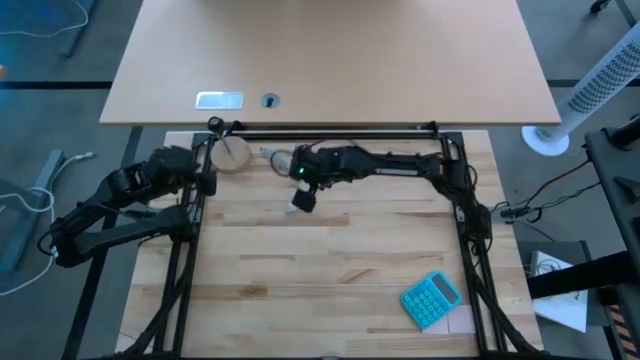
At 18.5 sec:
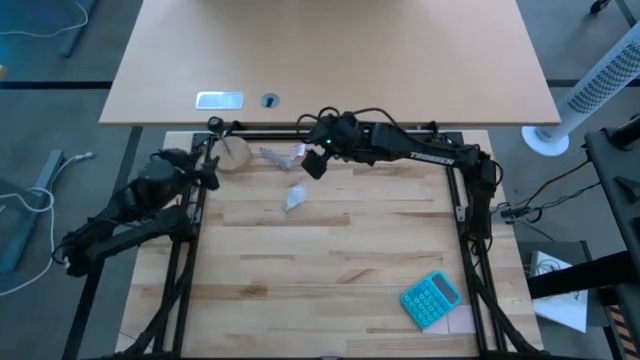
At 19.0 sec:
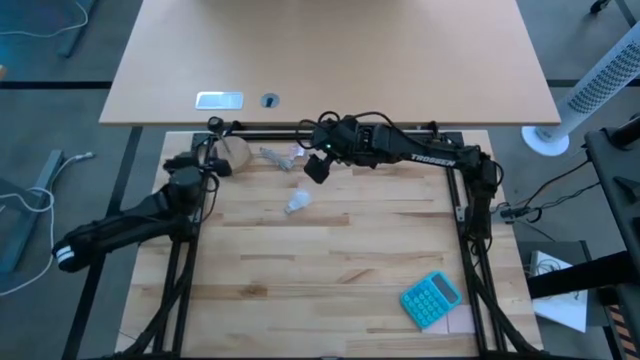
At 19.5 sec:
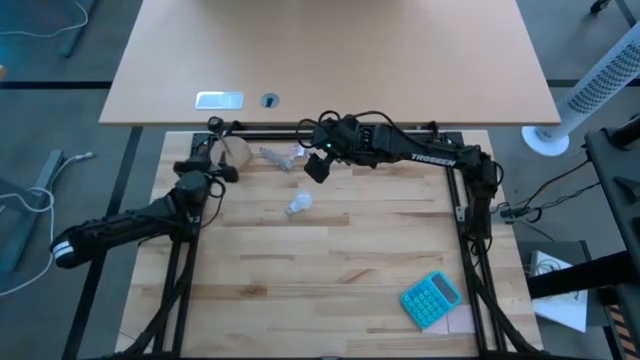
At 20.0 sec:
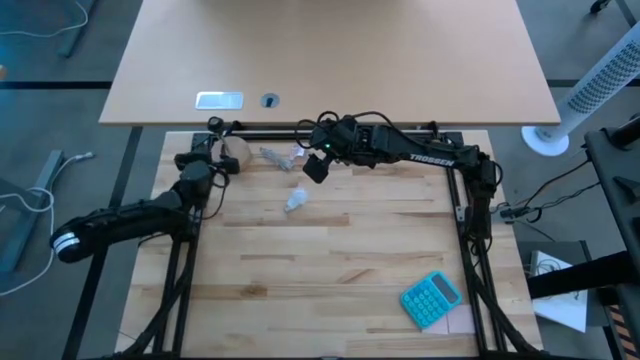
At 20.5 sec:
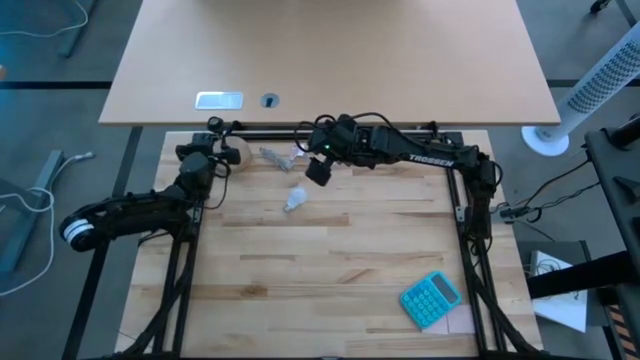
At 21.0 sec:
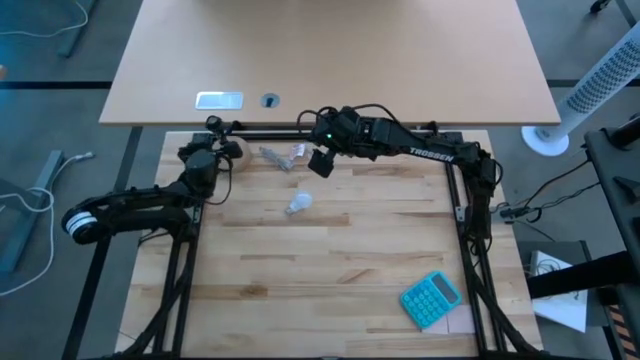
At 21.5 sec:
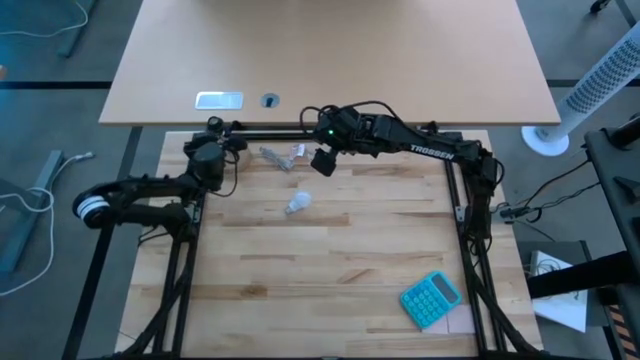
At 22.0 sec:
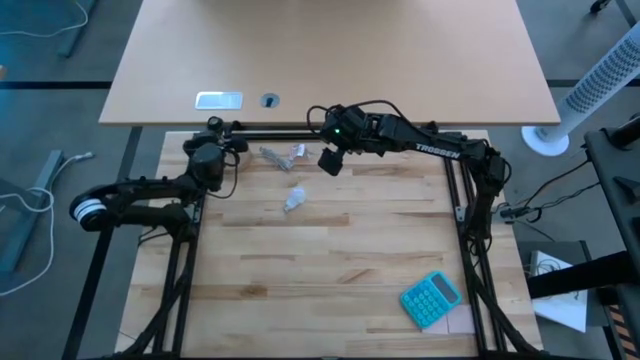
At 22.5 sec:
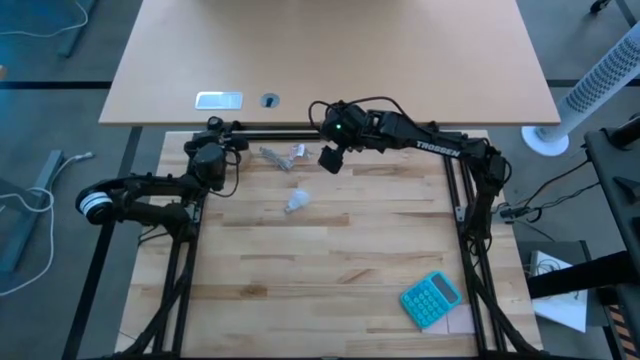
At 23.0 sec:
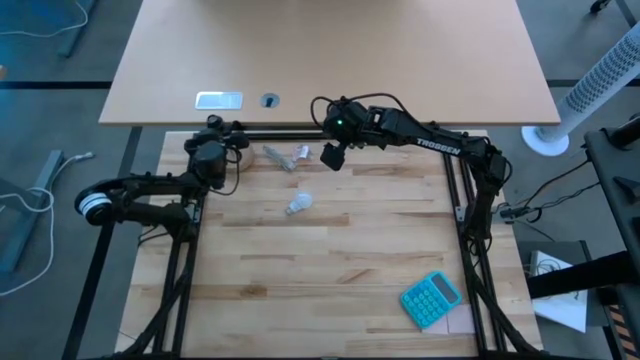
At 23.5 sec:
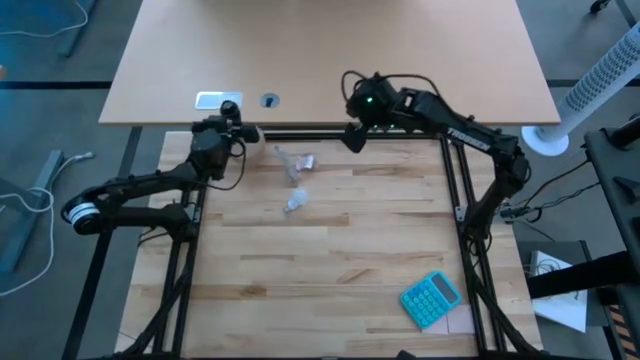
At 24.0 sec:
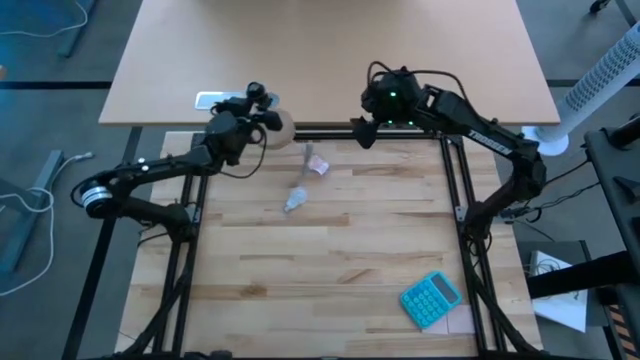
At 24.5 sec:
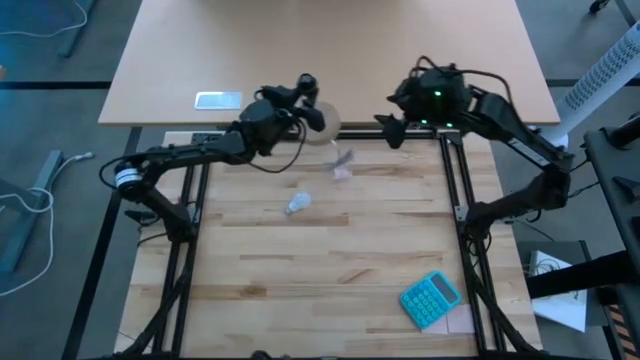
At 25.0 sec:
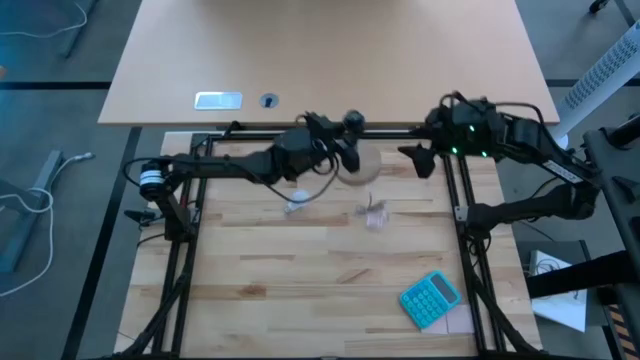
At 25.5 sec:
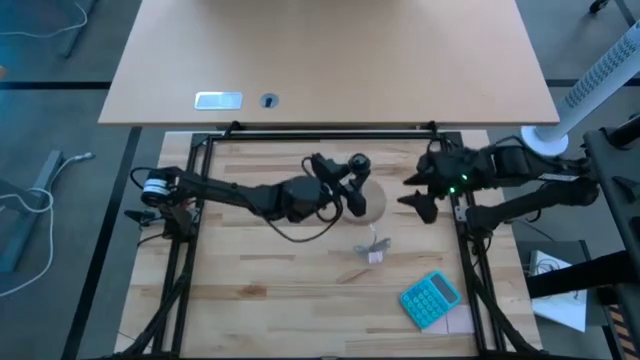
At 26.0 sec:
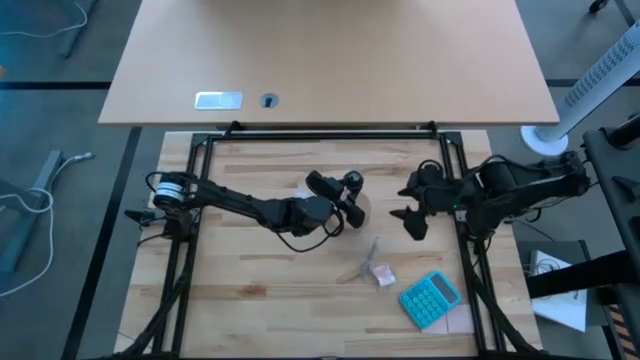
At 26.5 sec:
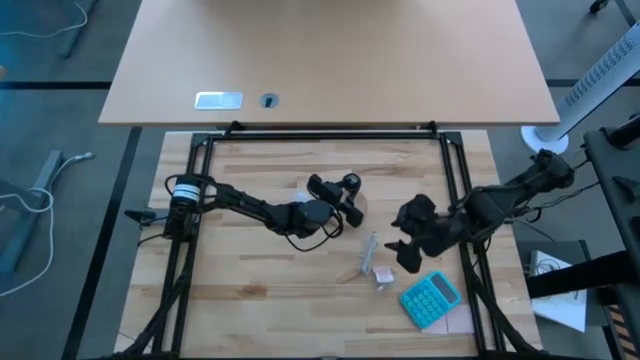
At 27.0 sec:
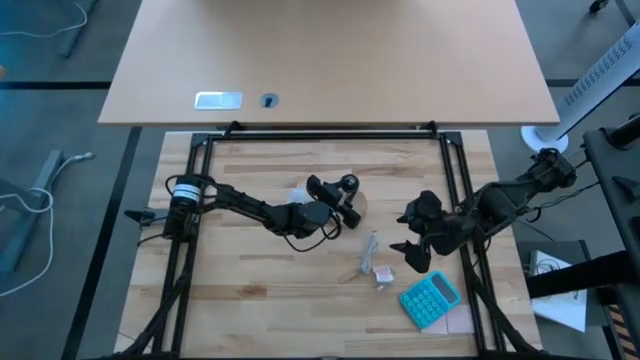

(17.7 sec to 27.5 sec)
Task: Screw lightbulb
Move the lamp to the center of the table

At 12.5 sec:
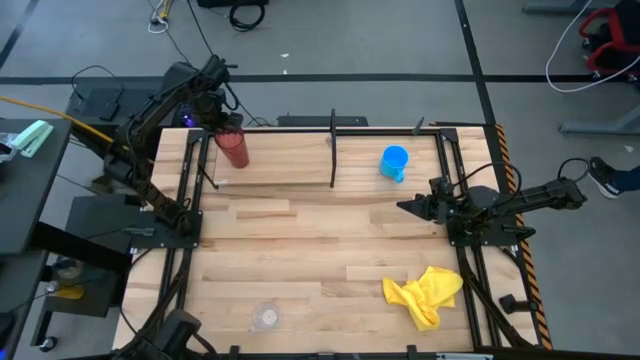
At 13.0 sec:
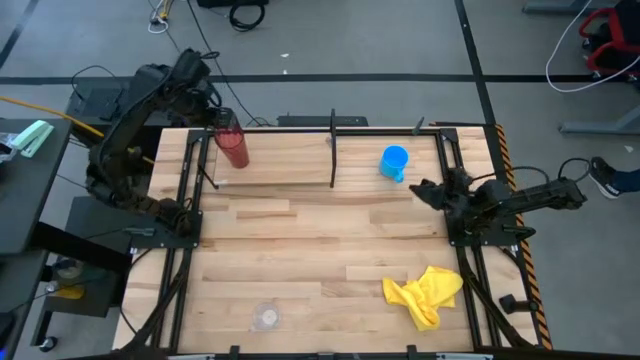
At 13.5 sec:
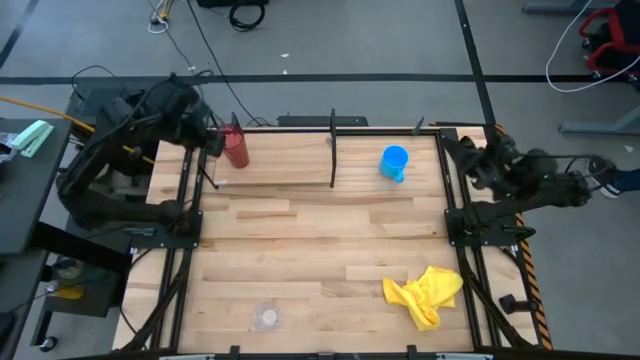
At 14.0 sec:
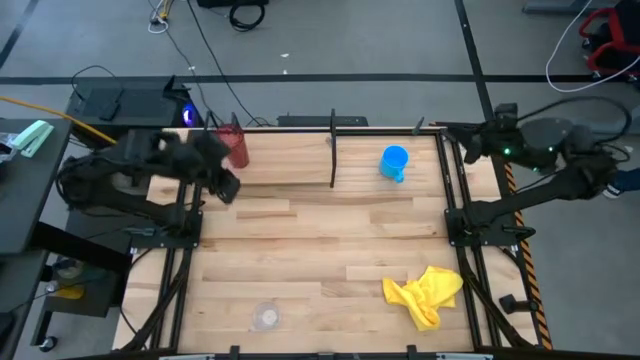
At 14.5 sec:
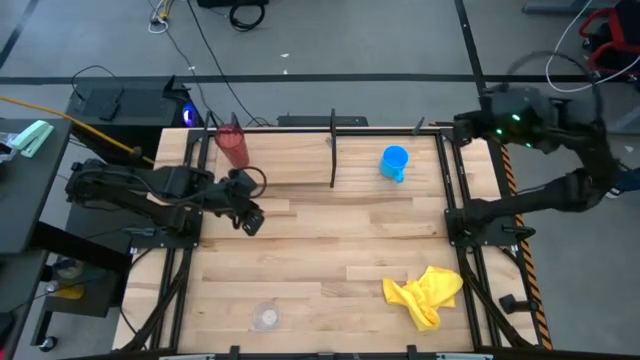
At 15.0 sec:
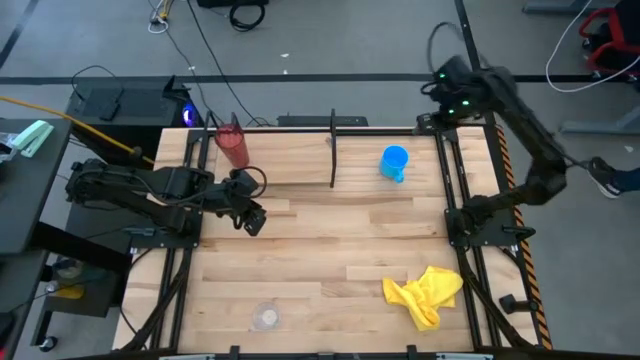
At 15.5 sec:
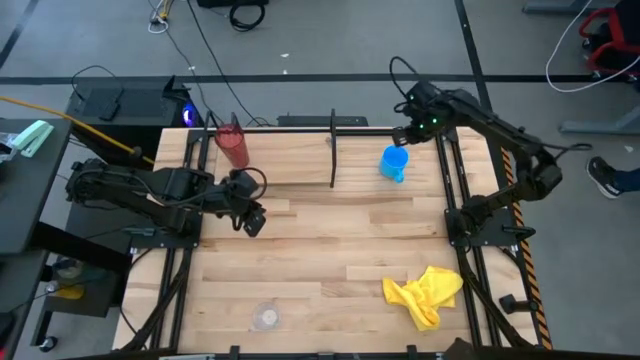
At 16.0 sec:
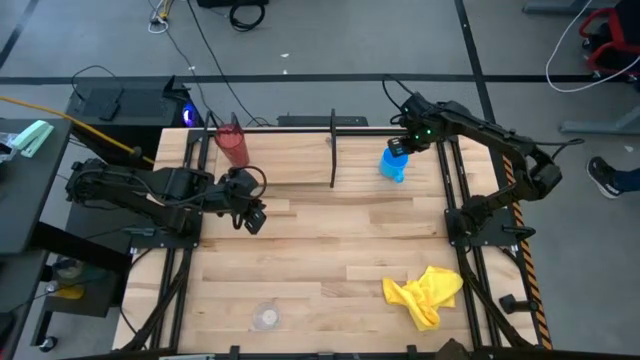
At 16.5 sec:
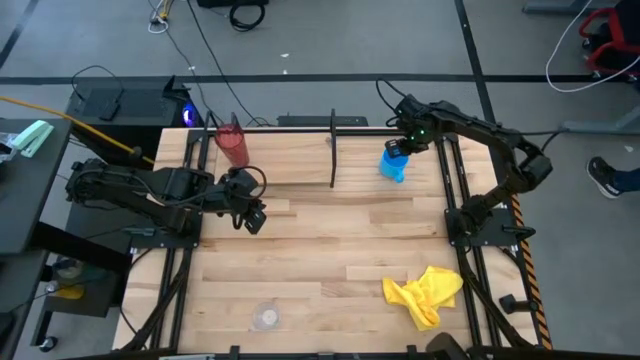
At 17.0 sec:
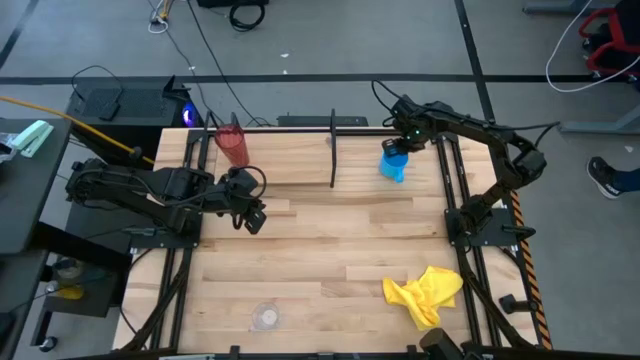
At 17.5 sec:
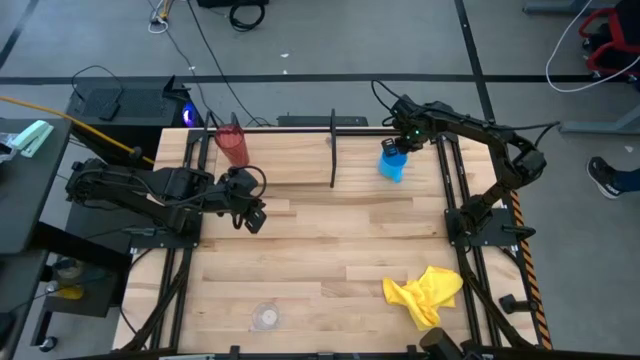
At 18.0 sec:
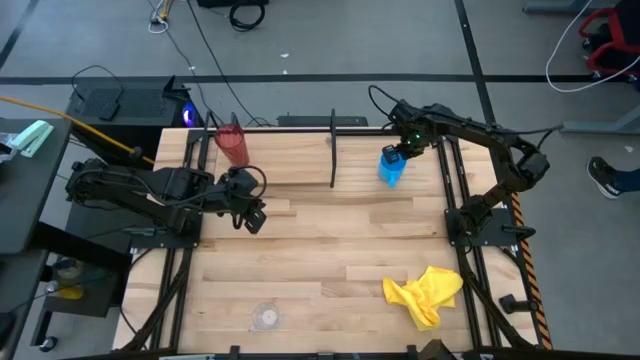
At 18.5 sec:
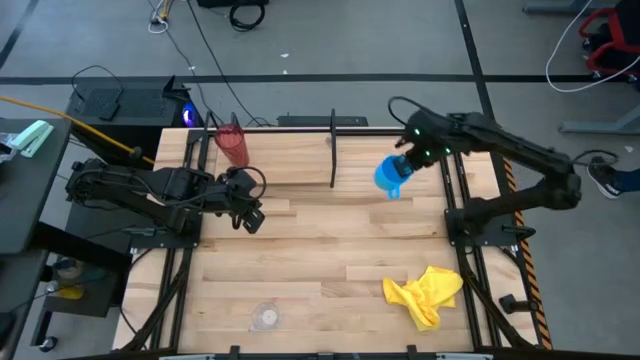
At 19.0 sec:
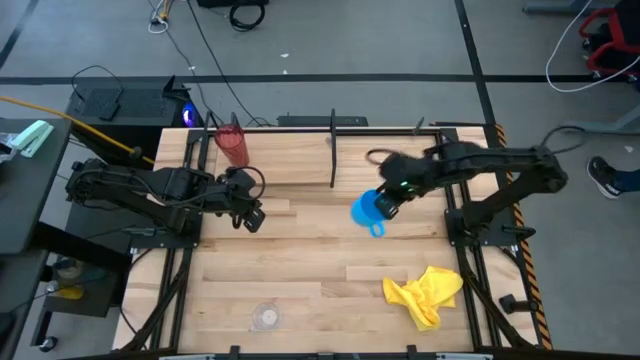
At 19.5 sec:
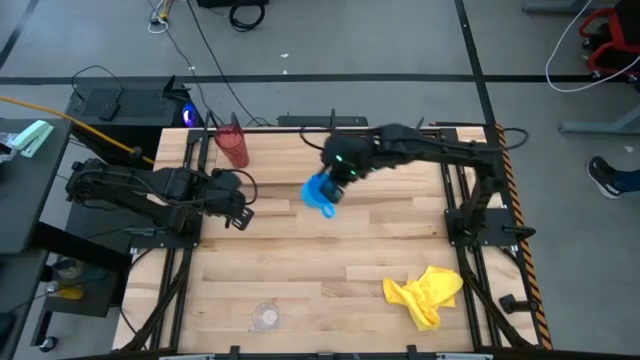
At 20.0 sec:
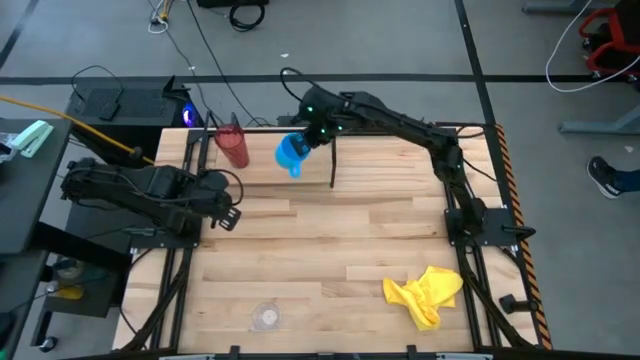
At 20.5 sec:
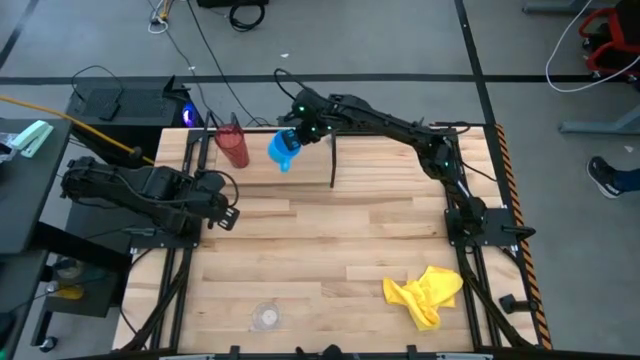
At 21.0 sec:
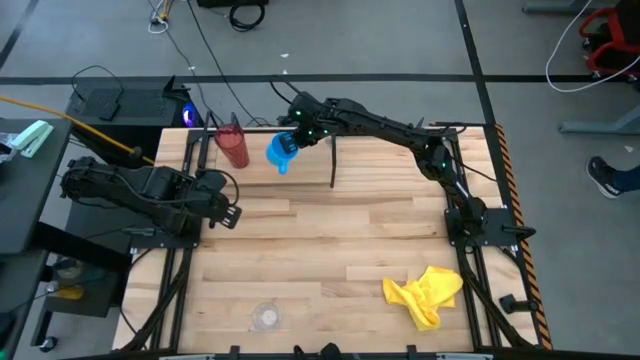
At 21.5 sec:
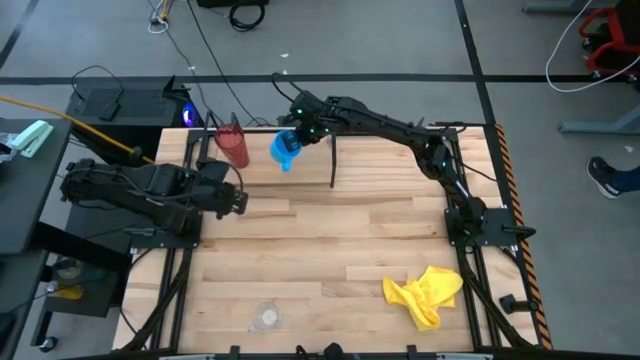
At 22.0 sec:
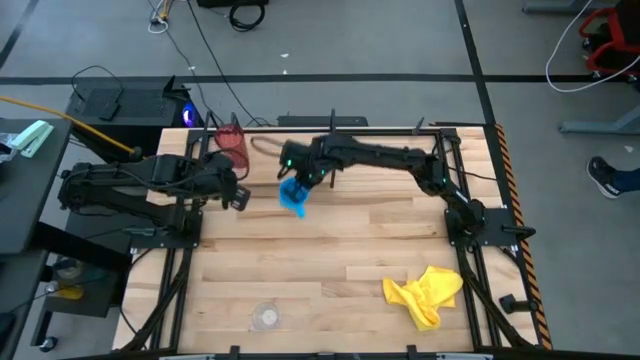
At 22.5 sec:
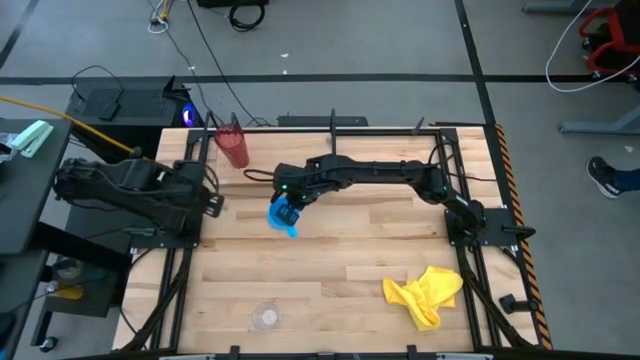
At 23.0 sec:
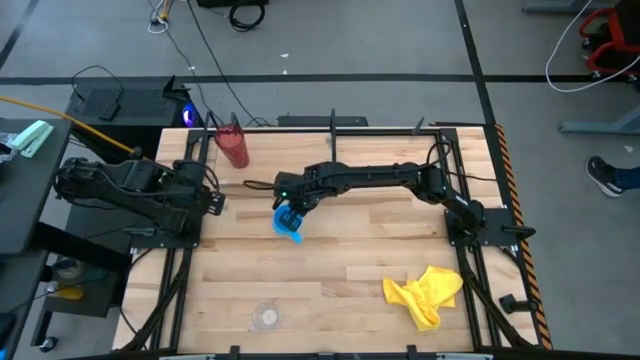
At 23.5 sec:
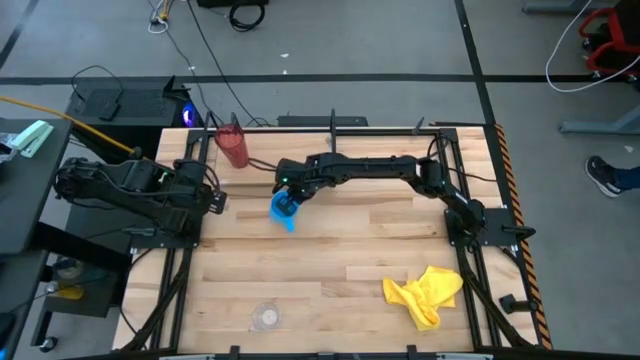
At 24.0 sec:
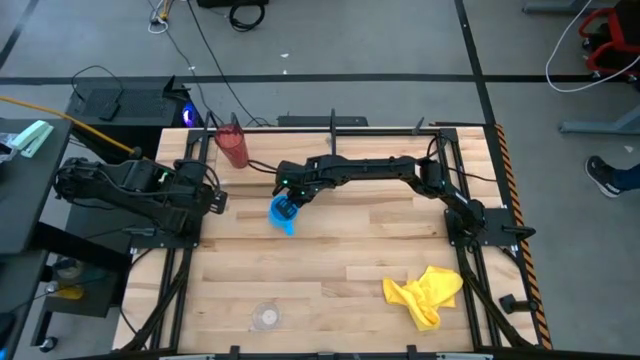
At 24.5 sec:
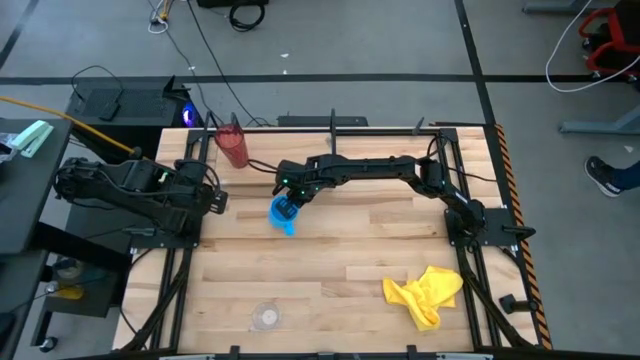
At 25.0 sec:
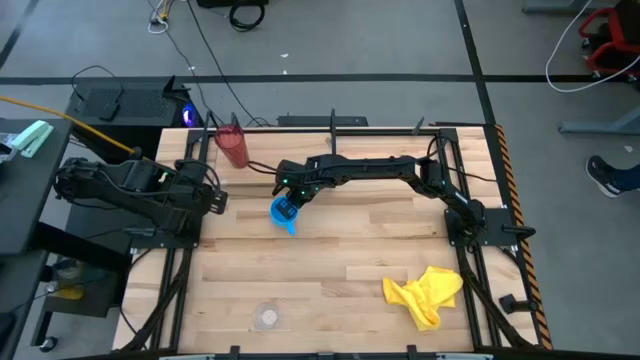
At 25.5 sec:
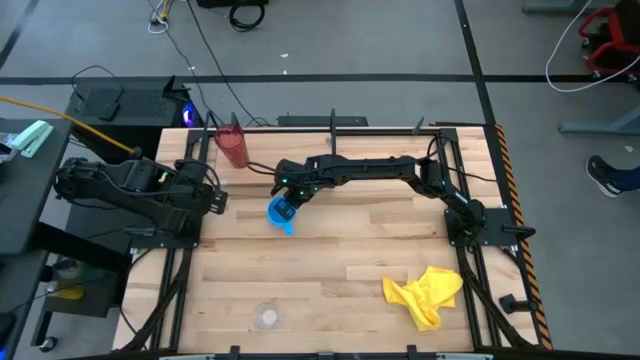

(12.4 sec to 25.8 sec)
Task: Stack small to large cups/mugs on shelf
Put the blue mug on the shelf
